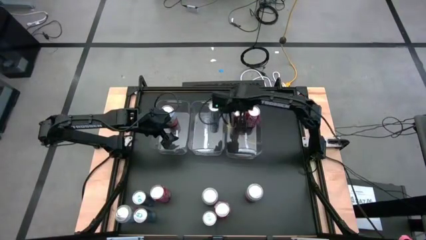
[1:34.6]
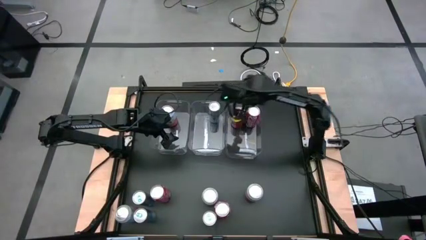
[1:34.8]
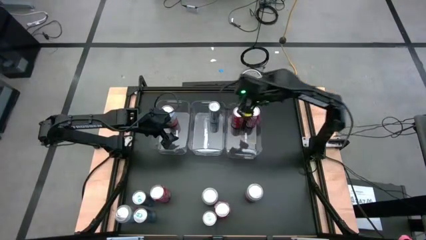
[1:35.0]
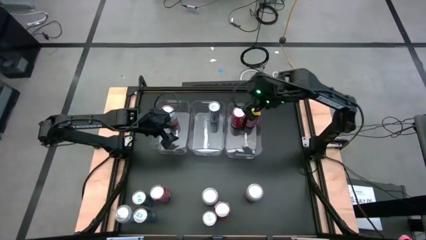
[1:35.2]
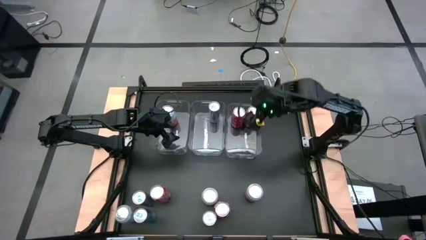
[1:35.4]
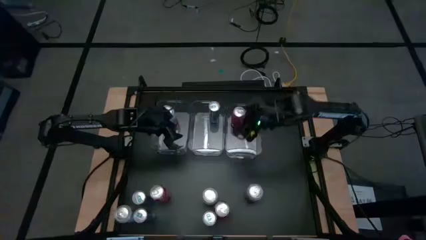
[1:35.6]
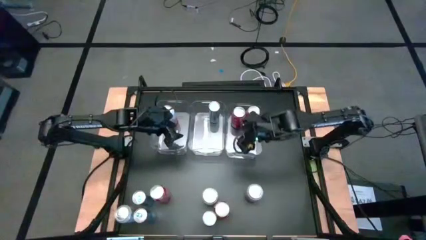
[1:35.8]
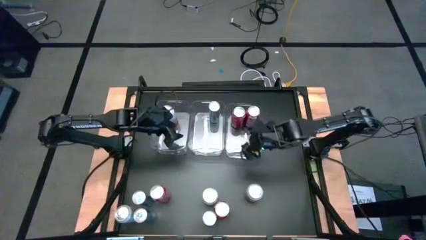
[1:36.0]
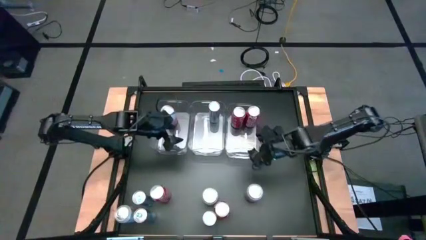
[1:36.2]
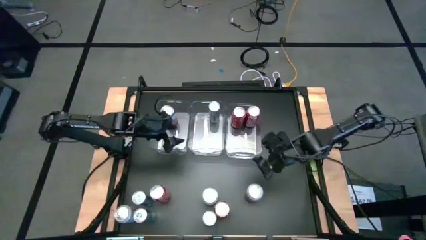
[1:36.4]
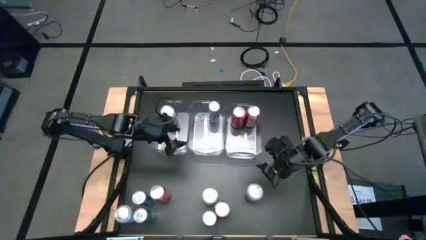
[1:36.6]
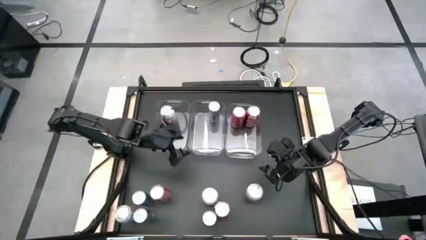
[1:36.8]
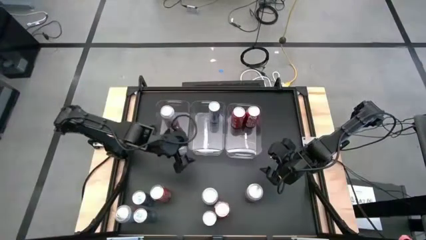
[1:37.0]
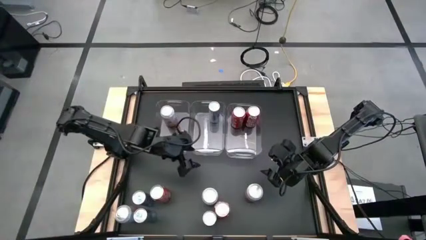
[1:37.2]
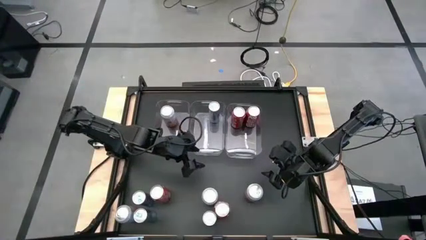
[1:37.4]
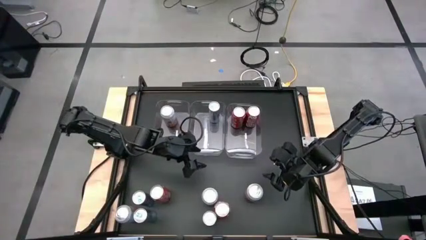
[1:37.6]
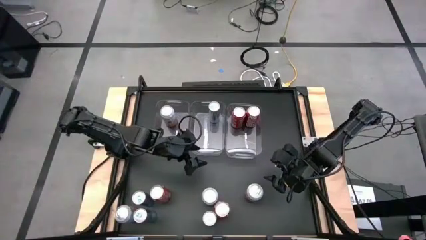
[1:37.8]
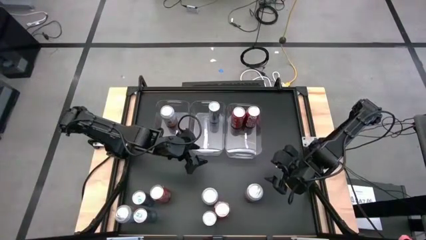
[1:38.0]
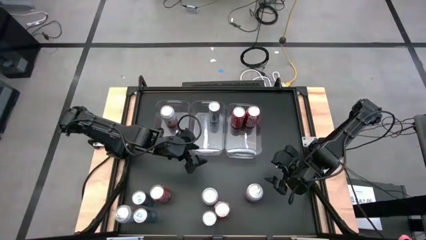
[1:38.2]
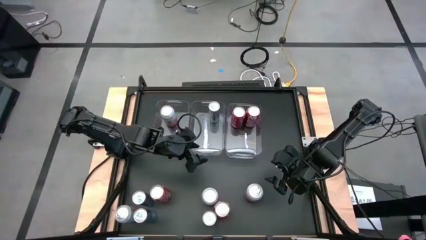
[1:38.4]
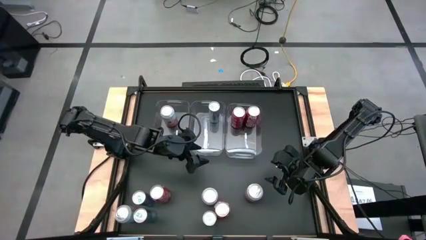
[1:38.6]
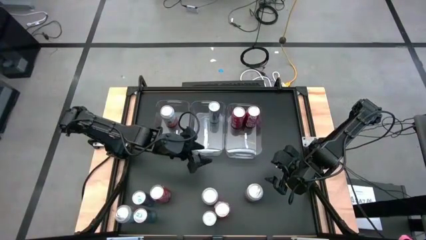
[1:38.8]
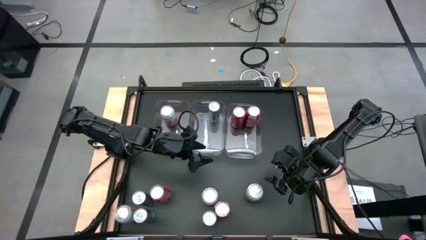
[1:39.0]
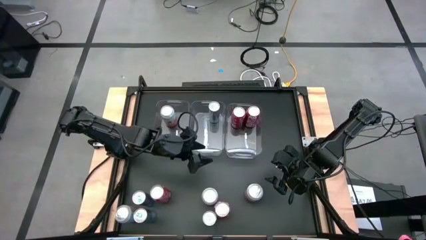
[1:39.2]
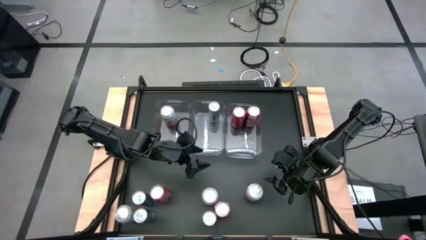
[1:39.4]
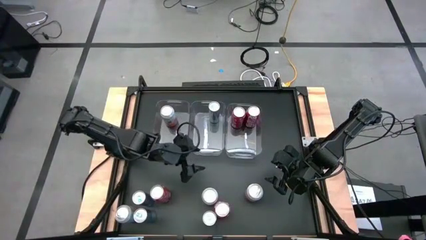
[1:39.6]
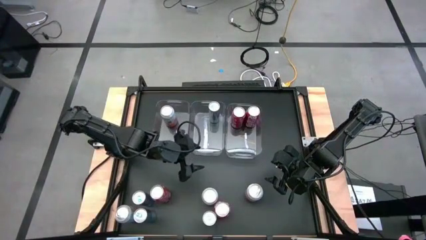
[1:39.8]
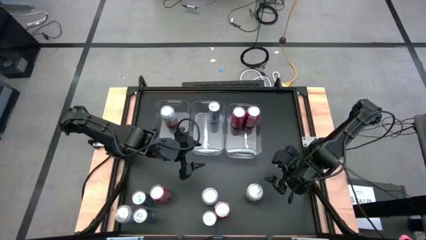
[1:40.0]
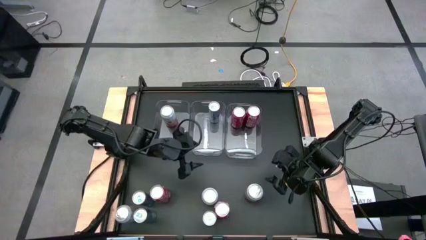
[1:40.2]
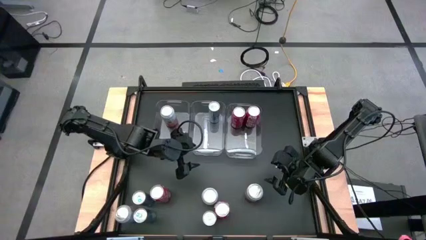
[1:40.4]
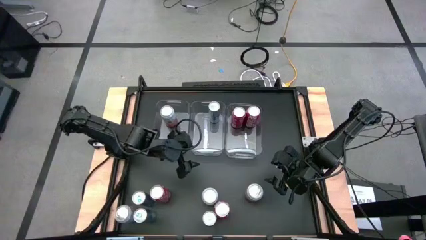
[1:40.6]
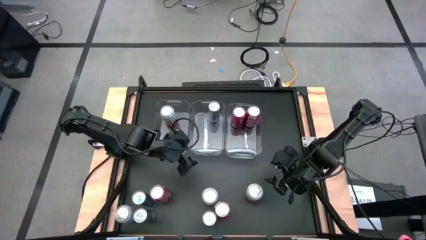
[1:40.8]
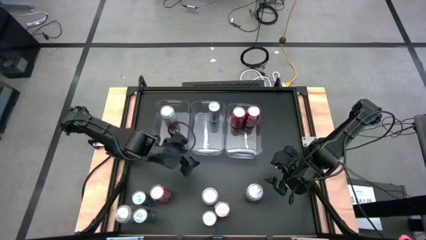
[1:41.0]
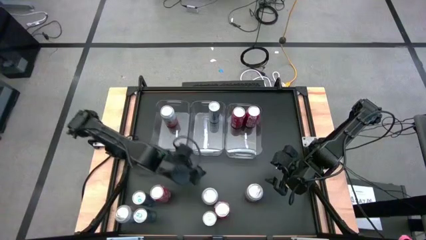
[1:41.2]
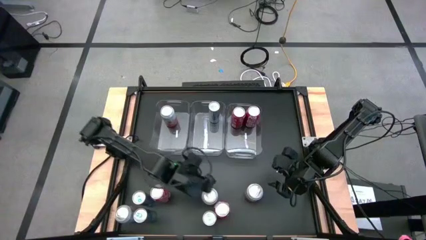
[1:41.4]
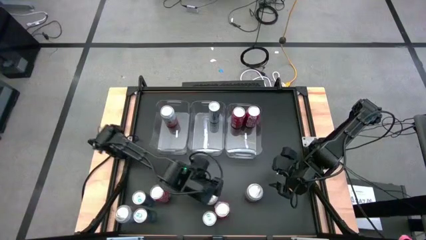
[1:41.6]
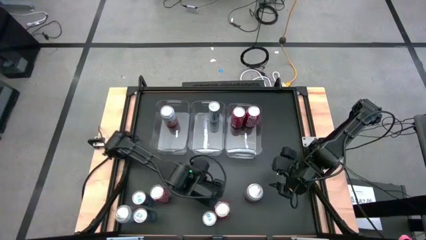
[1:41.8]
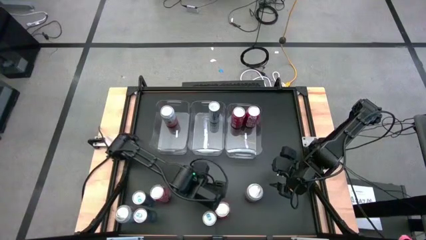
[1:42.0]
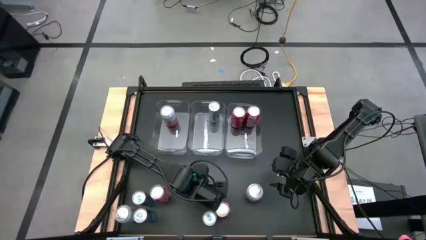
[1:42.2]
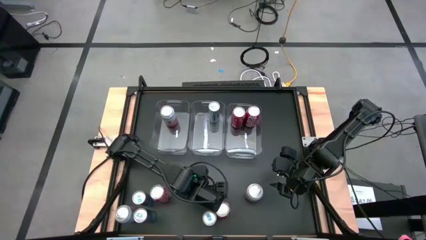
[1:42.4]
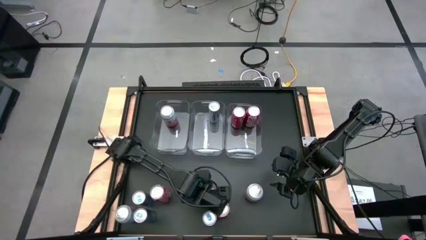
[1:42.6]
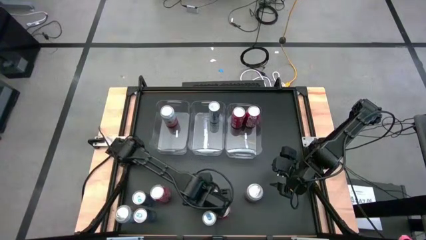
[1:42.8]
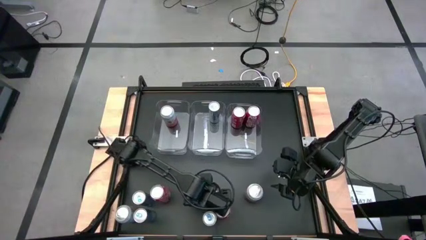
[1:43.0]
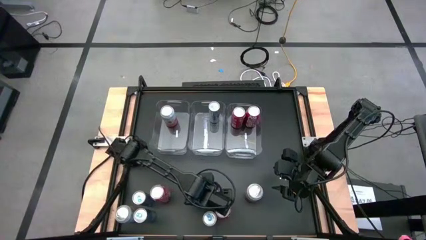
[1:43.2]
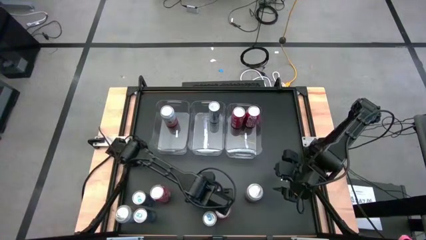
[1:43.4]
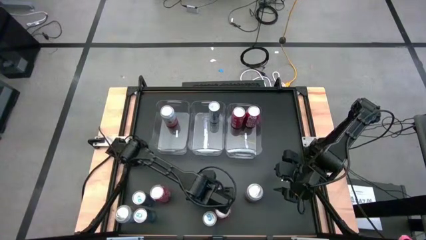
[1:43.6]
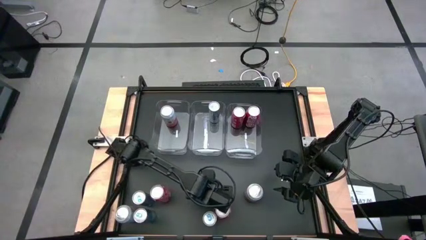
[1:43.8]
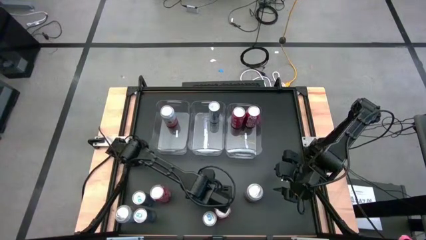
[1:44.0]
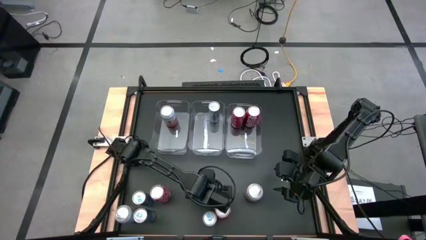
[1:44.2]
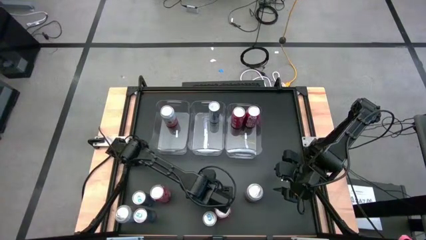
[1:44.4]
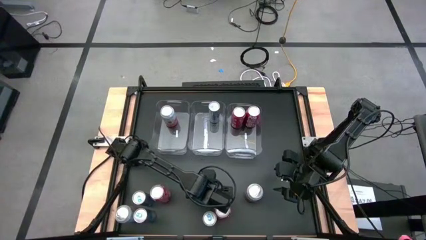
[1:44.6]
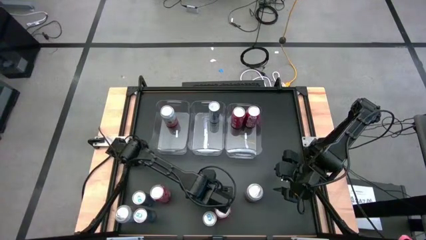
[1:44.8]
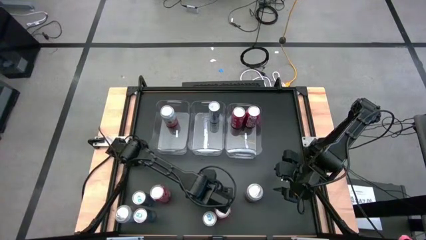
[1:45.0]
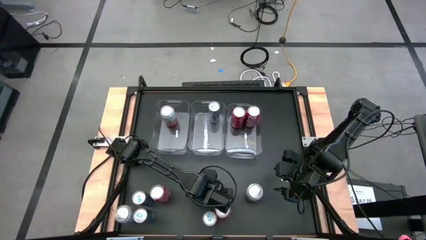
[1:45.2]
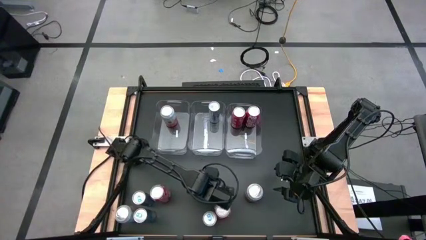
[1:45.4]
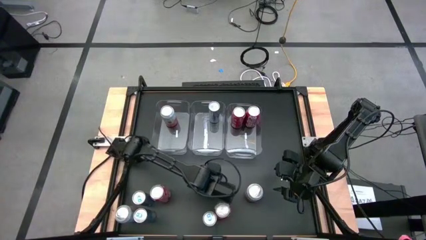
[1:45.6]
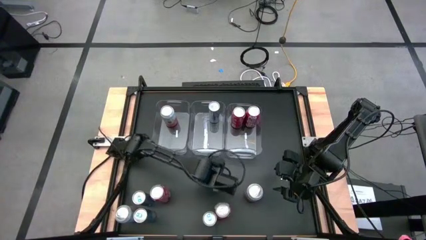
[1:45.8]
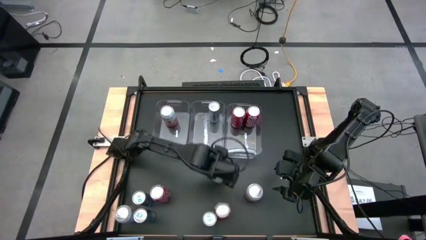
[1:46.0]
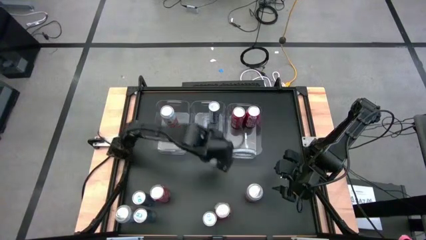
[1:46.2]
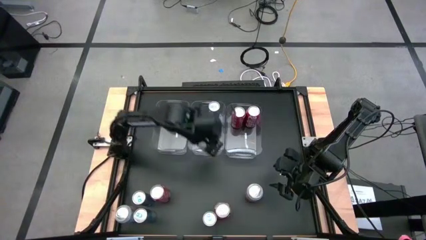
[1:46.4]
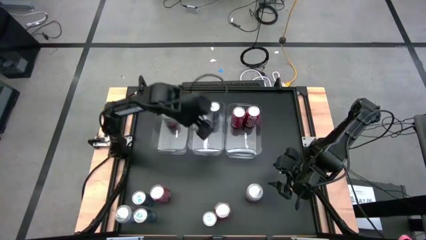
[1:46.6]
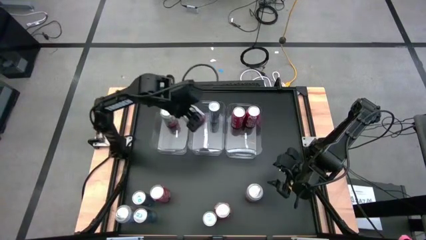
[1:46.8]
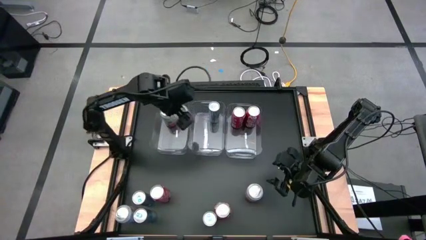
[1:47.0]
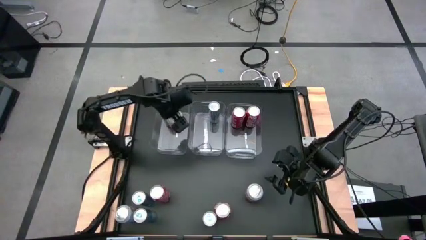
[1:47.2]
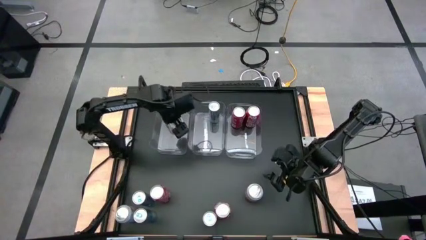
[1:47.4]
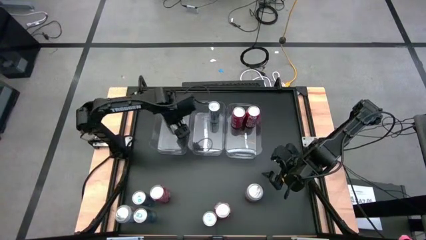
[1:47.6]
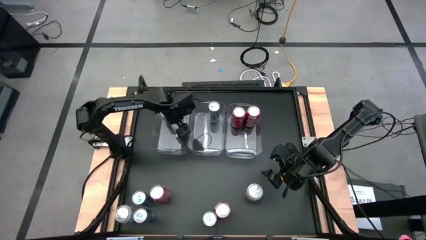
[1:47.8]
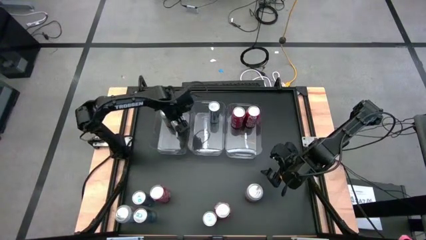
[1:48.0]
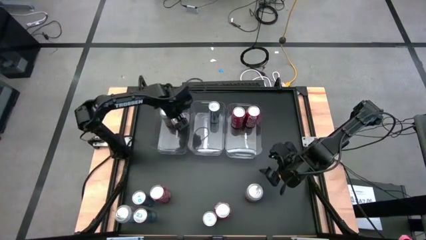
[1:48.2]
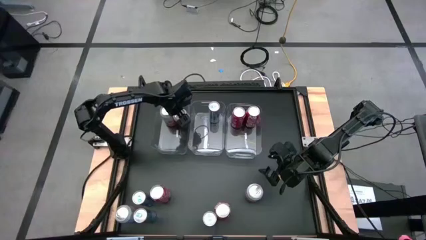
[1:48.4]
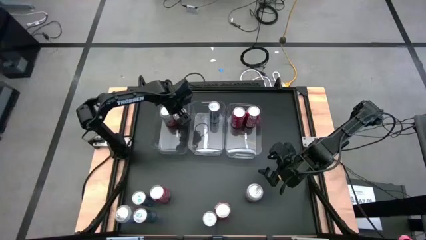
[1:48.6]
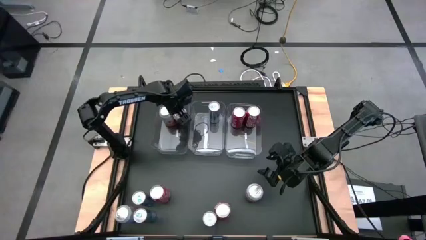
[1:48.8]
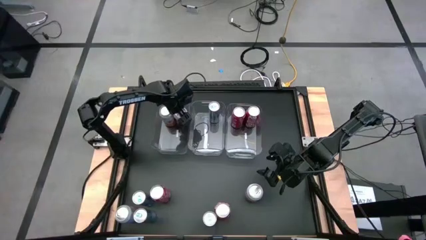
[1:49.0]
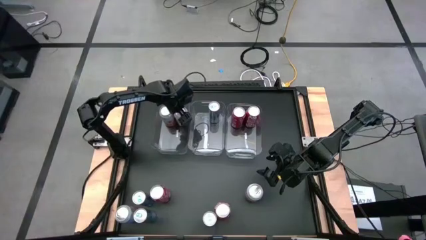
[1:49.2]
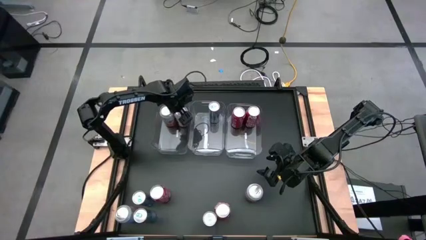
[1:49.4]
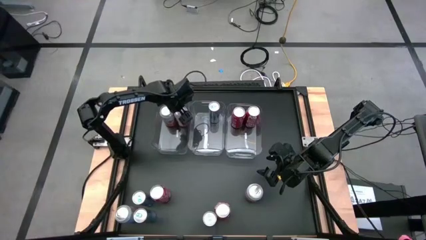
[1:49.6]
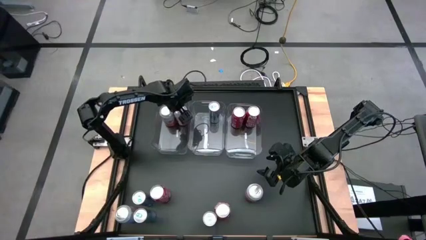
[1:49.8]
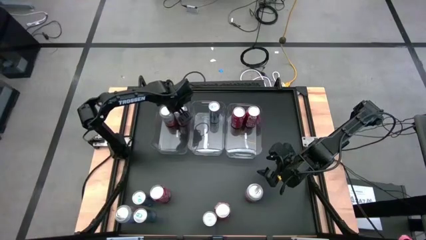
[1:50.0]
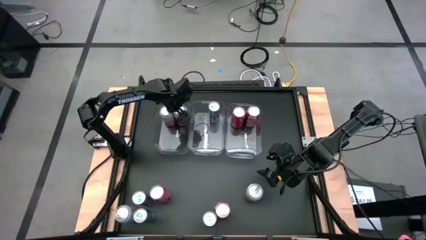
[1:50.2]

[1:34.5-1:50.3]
Task: Sort soda cans
Put the pink soda can into the left transparent bin
